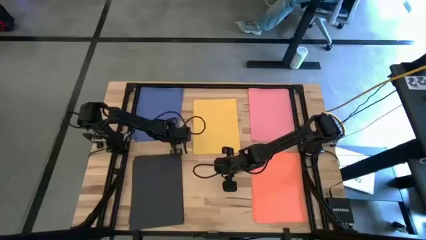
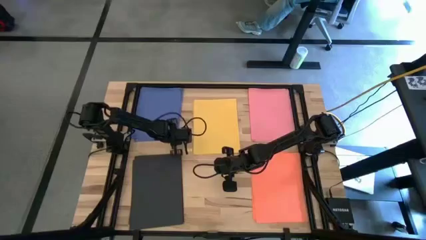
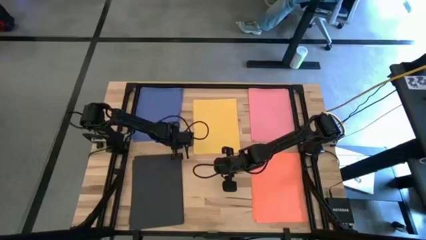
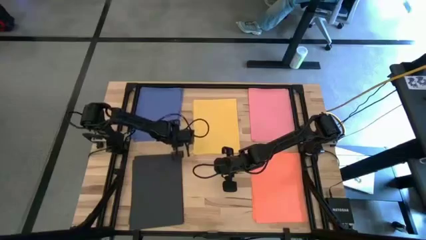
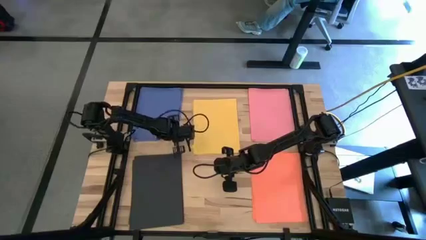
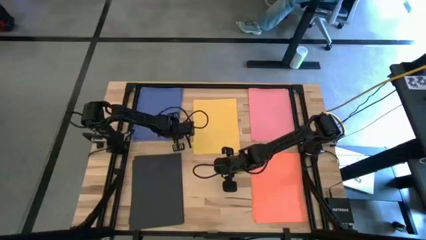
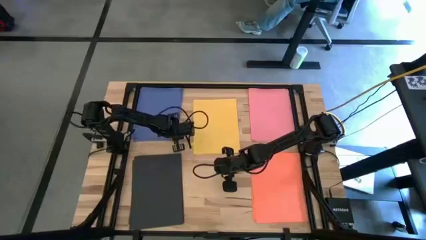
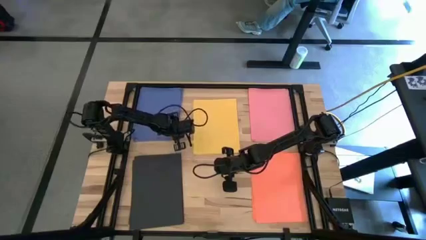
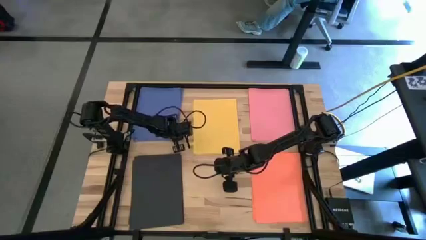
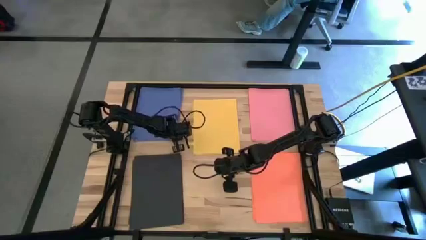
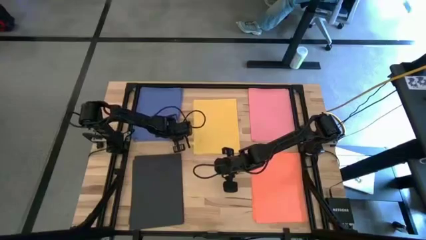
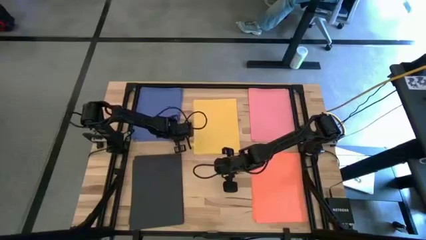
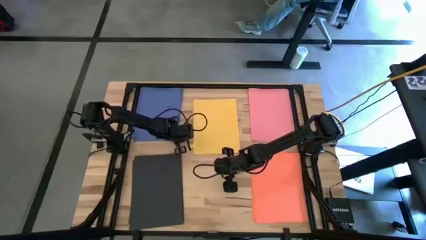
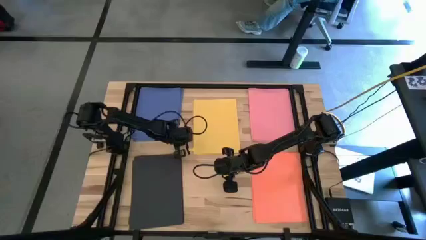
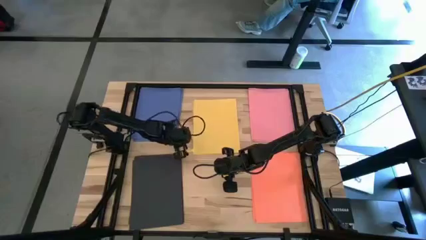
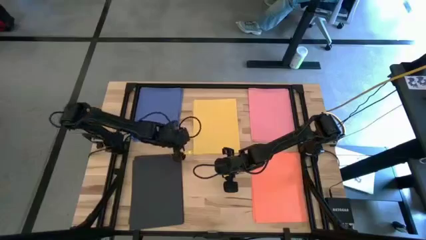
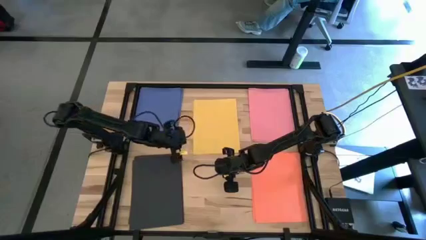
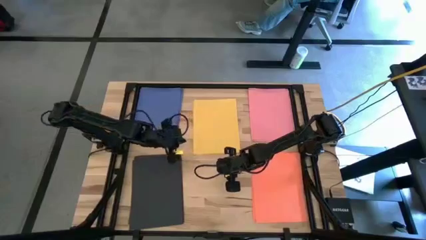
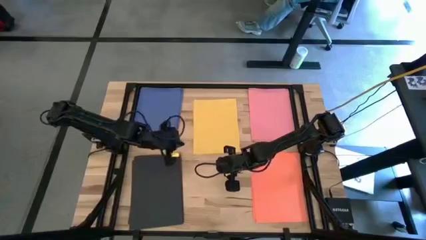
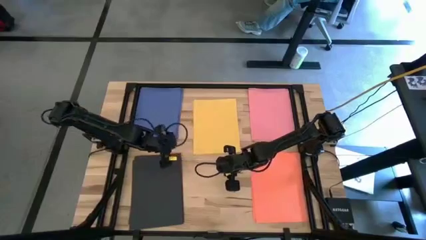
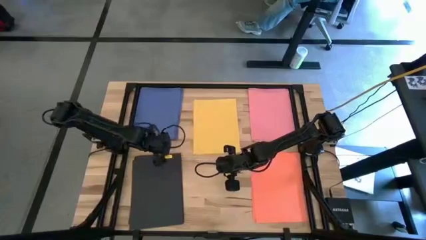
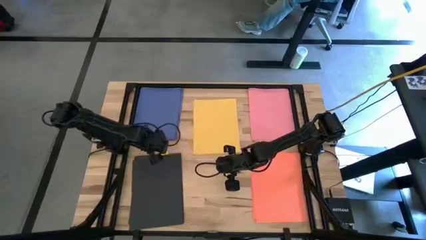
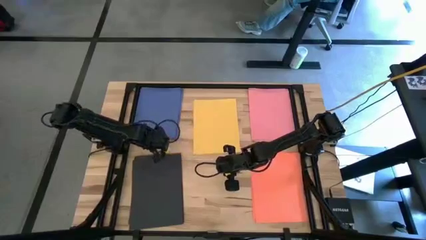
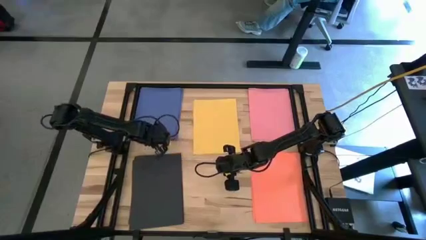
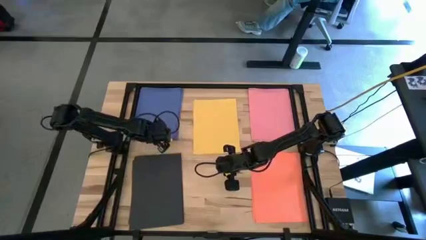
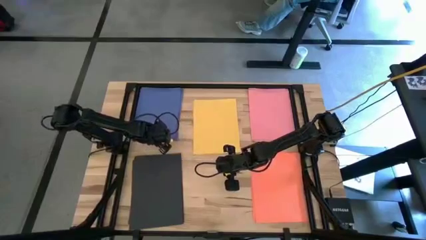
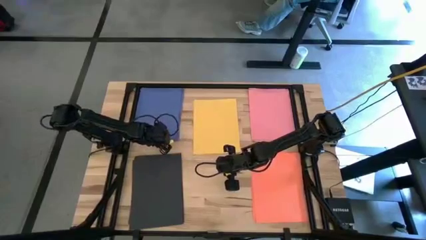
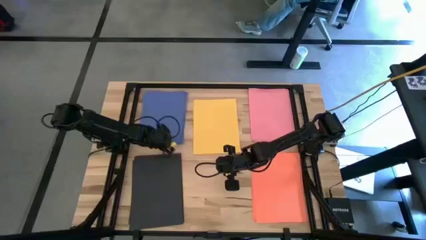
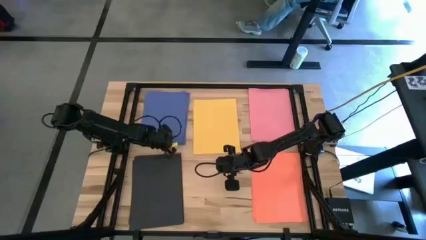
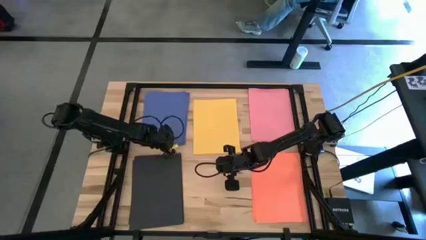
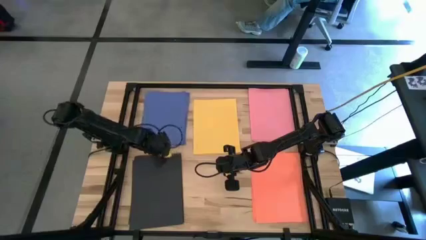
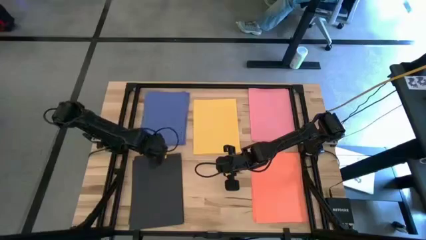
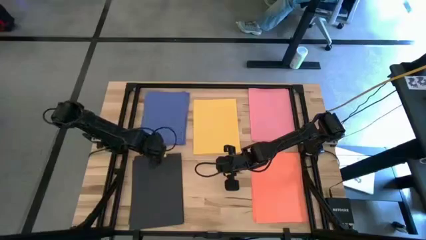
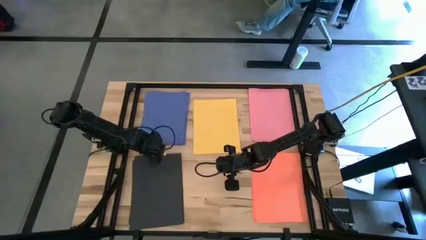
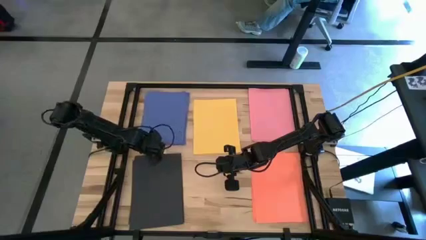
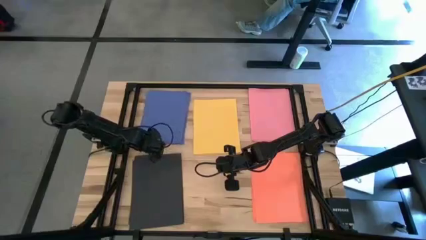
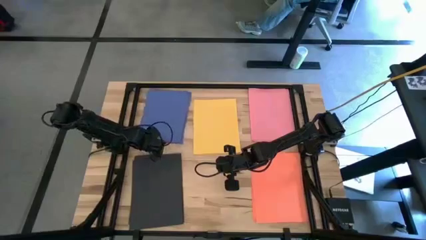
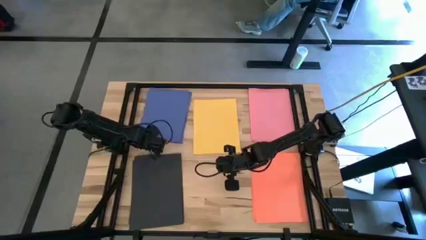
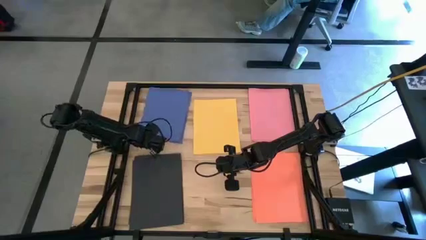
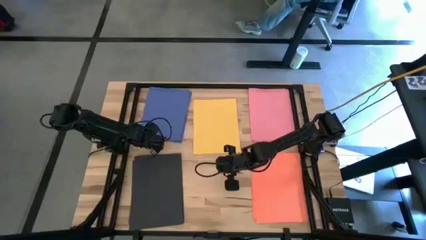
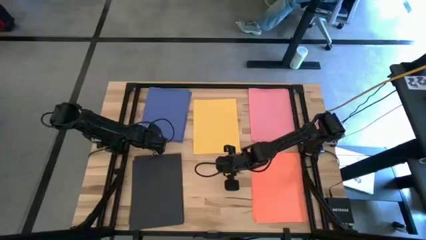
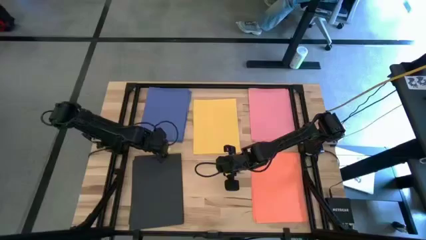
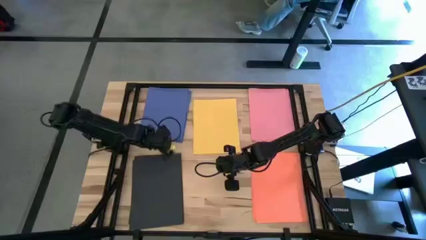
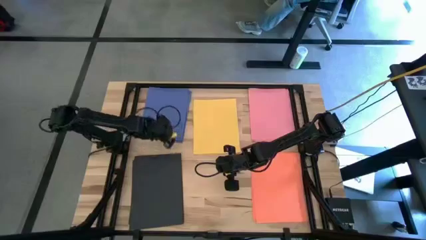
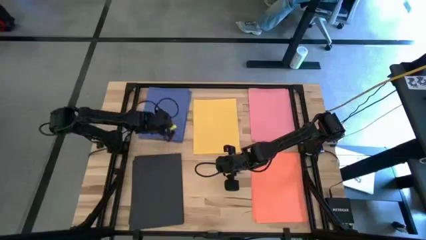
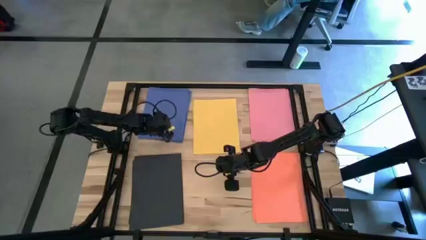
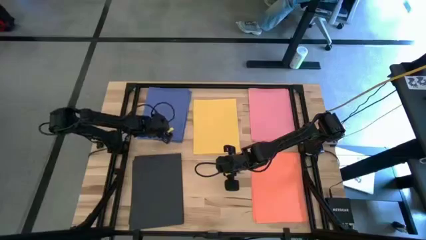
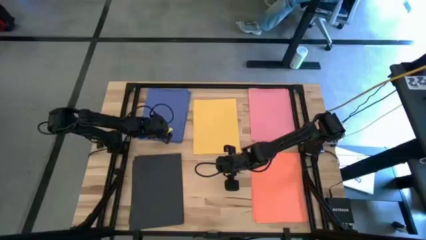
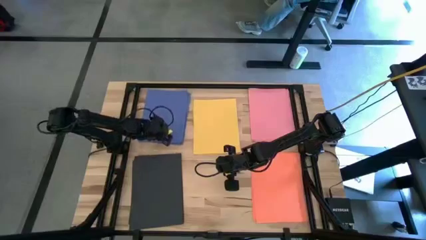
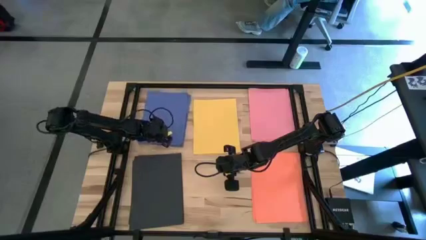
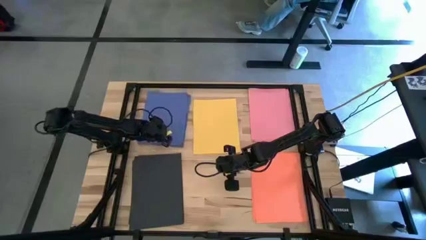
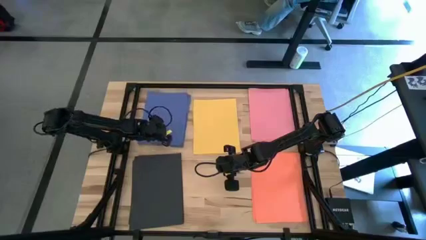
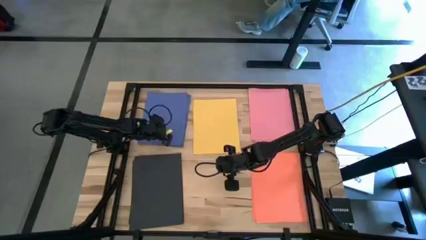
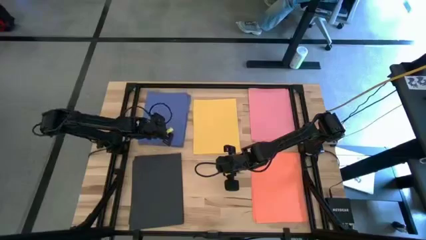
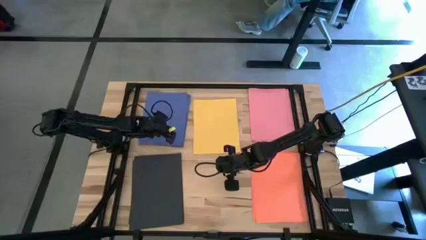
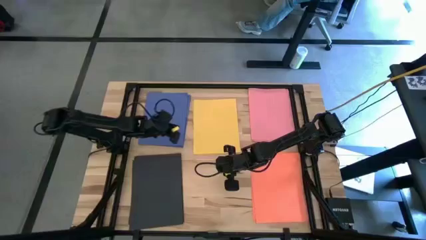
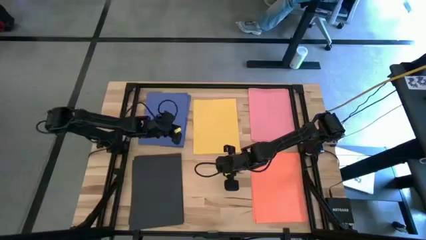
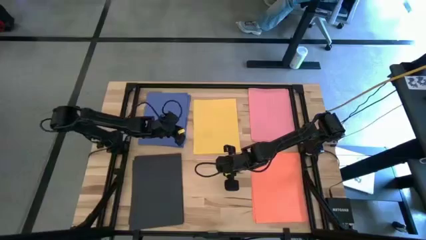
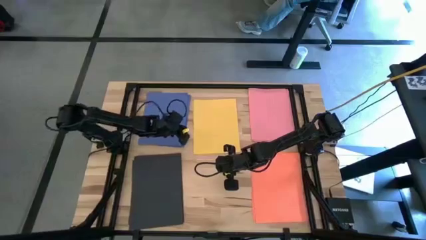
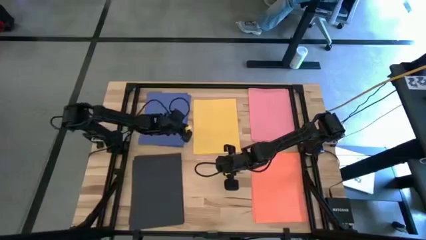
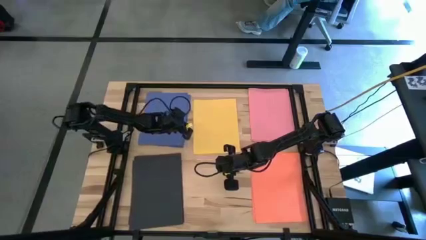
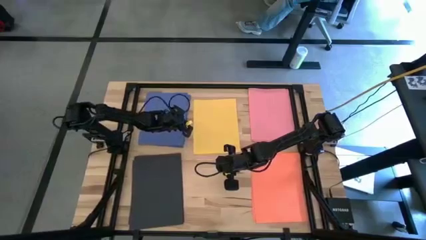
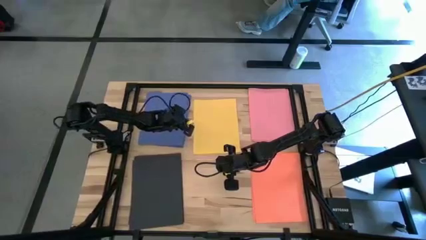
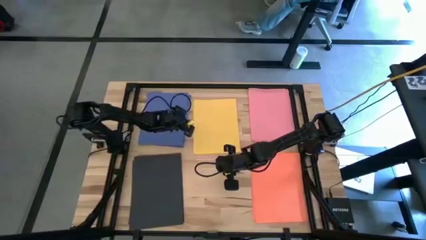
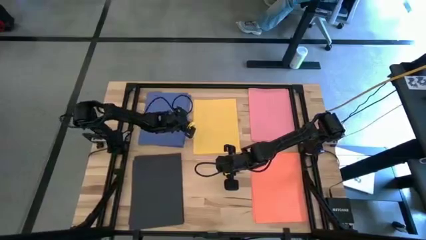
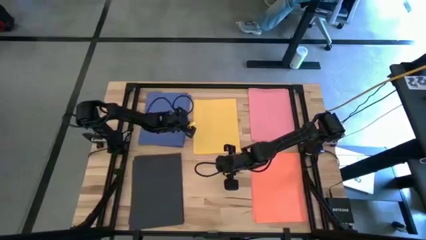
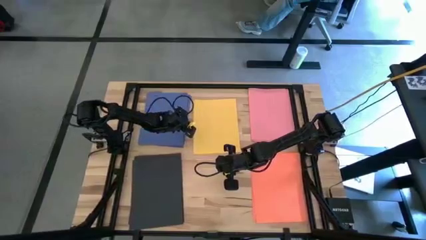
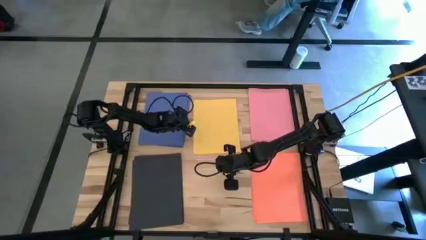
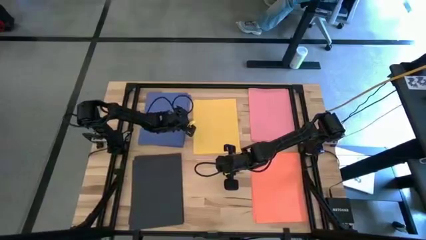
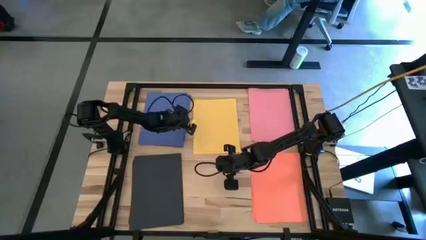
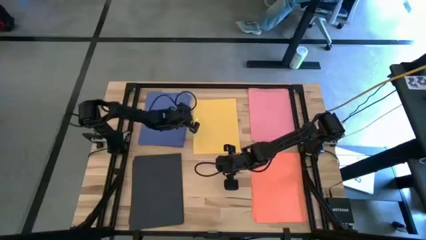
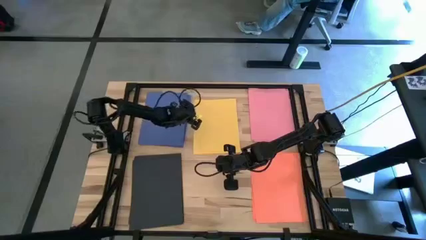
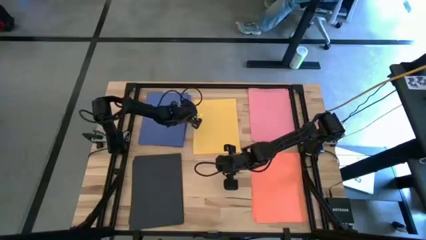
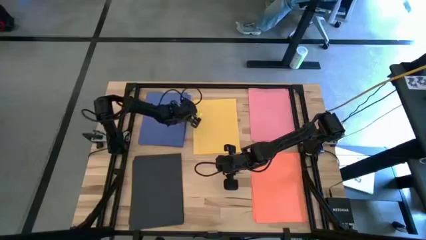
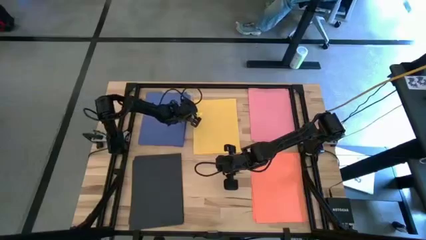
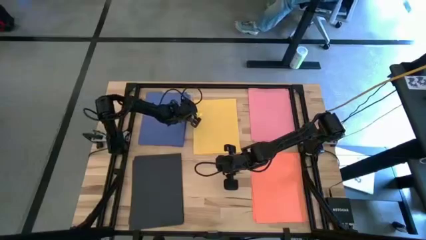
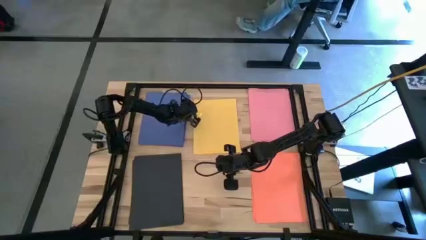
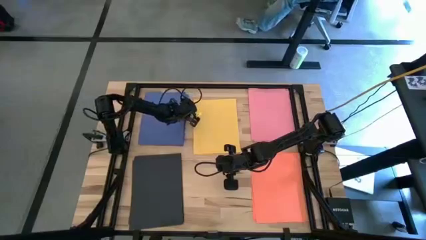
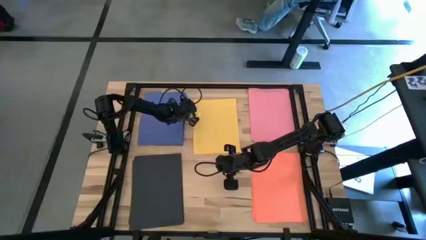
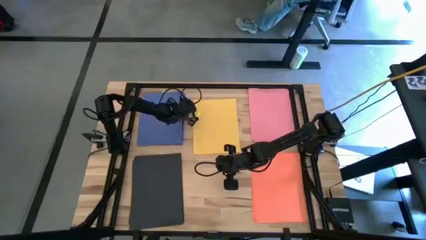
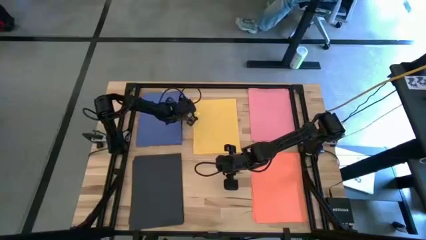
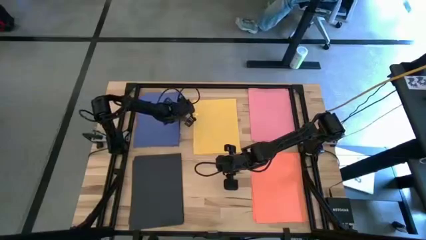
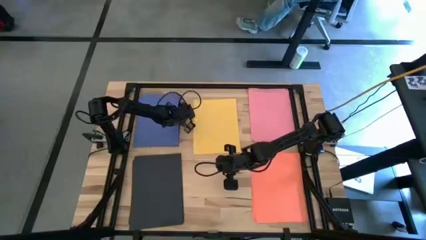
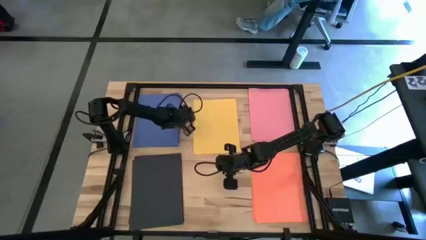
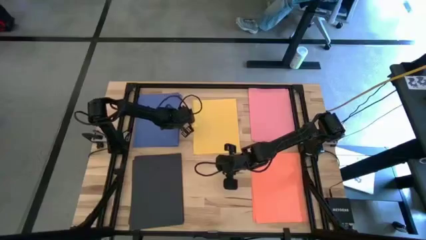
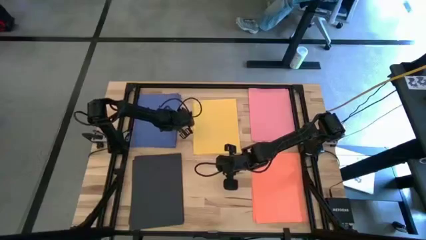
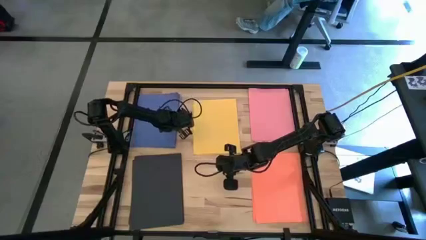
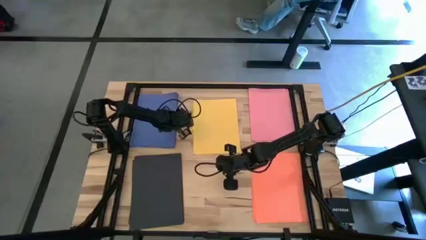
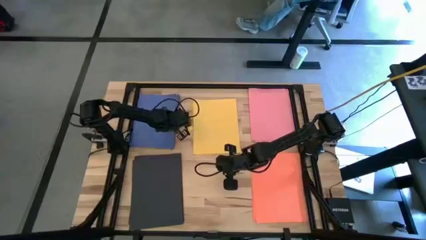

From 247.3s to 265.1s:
Task: Organize paper
Move the black papers to the bottom left of the table
